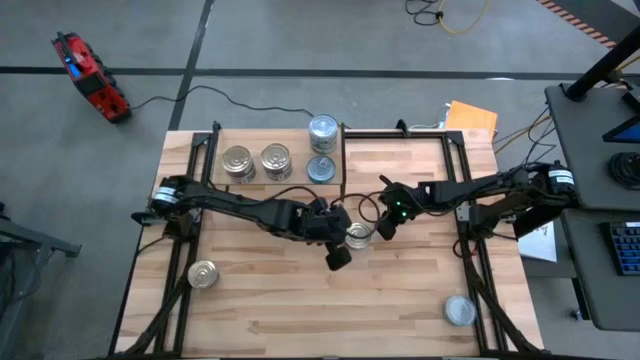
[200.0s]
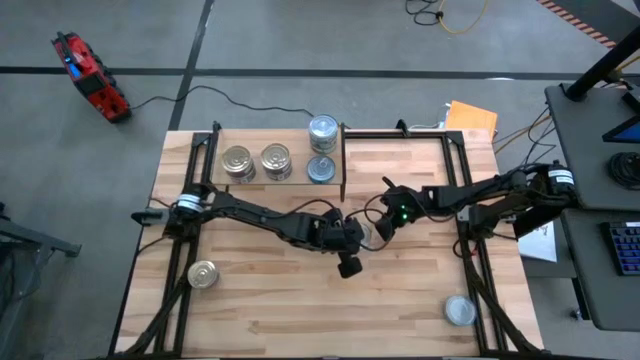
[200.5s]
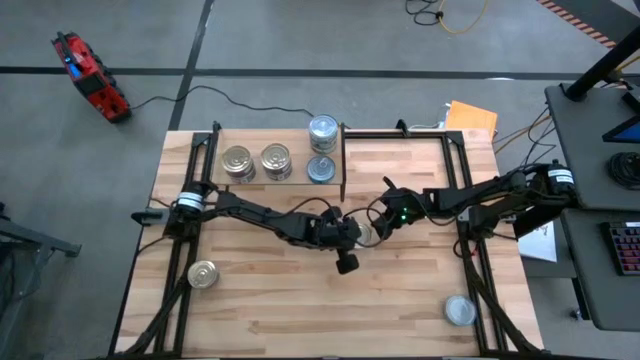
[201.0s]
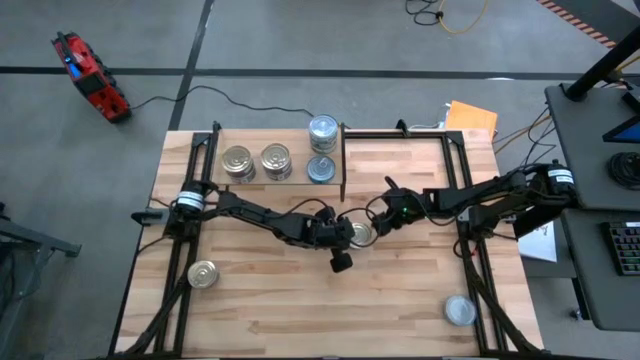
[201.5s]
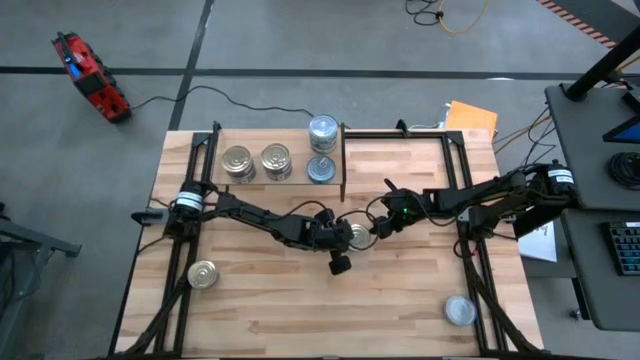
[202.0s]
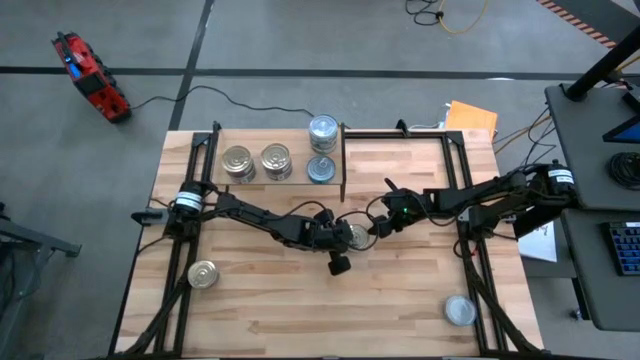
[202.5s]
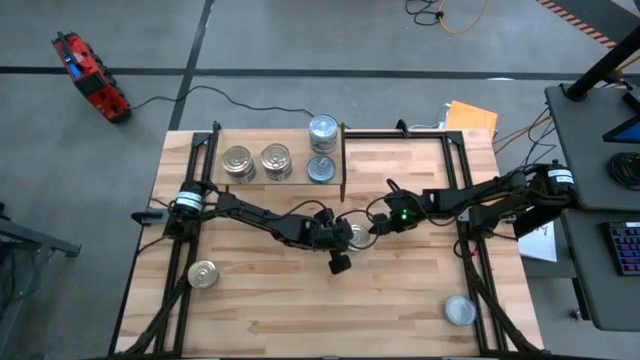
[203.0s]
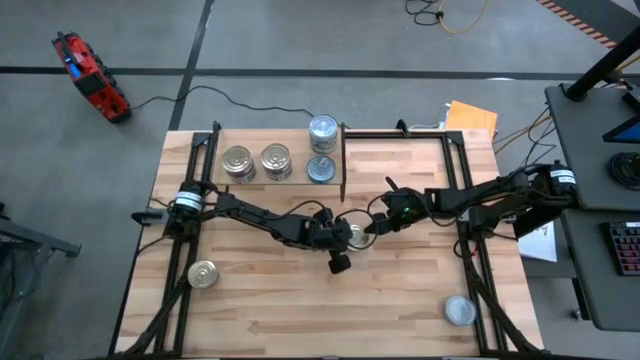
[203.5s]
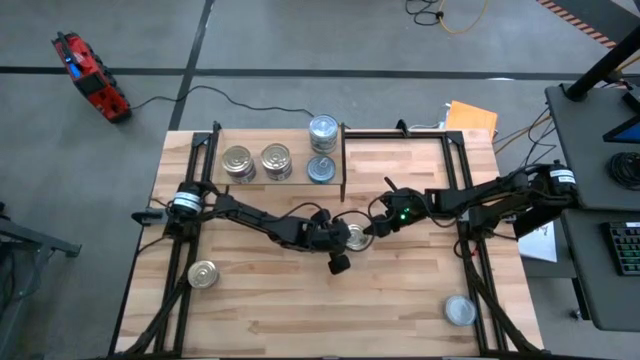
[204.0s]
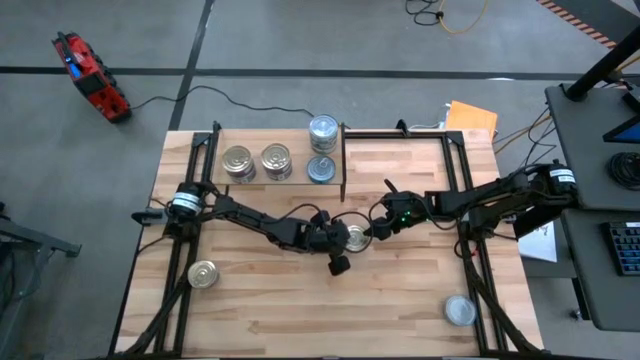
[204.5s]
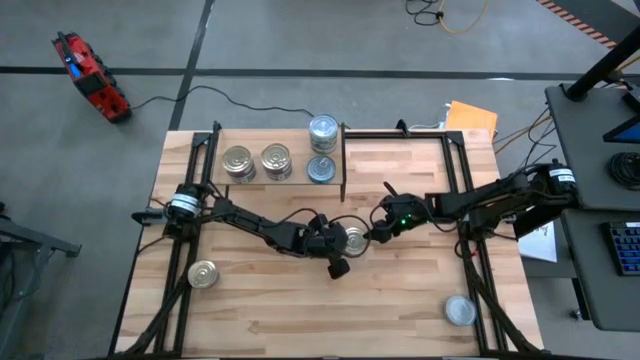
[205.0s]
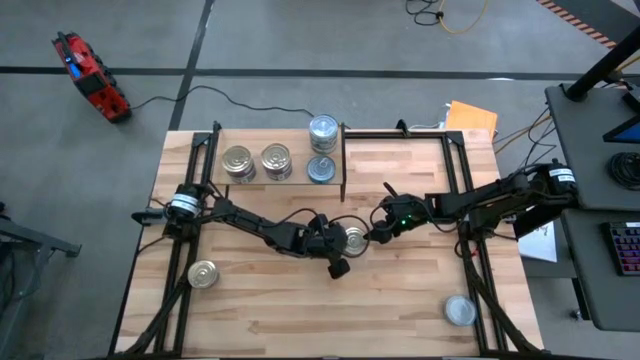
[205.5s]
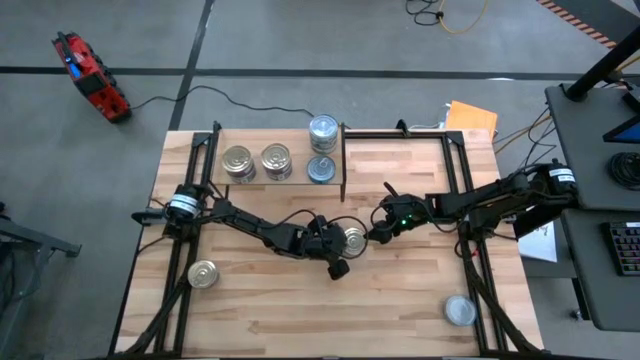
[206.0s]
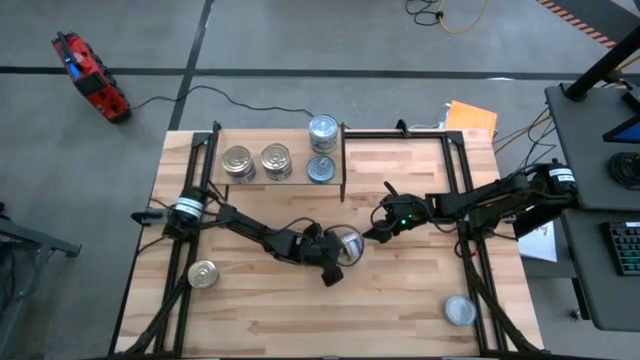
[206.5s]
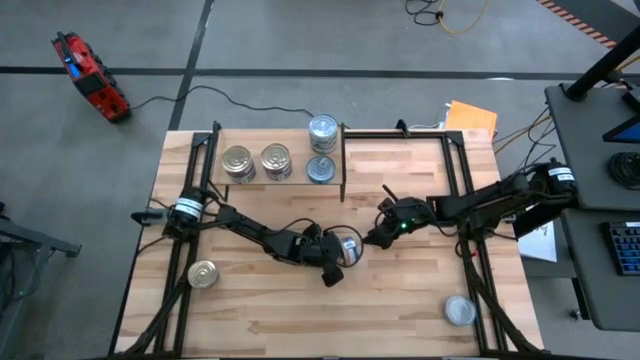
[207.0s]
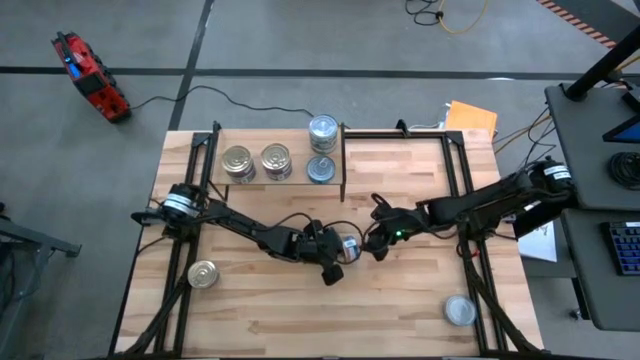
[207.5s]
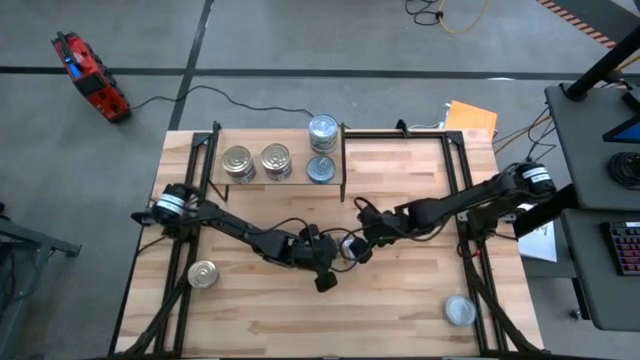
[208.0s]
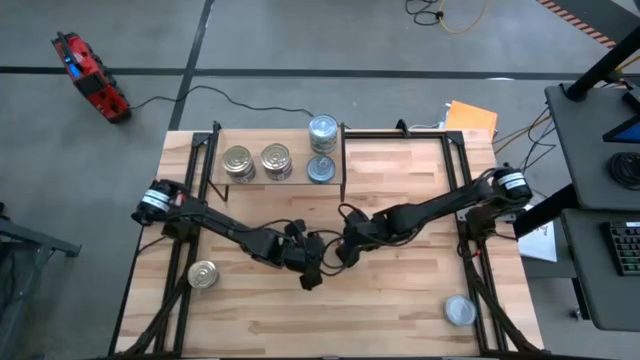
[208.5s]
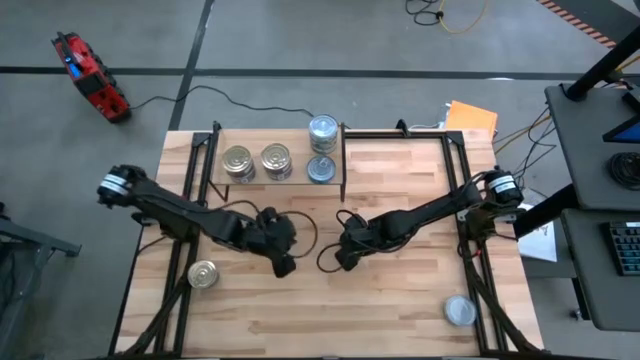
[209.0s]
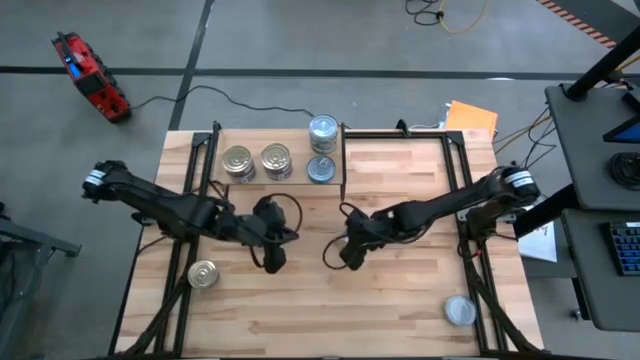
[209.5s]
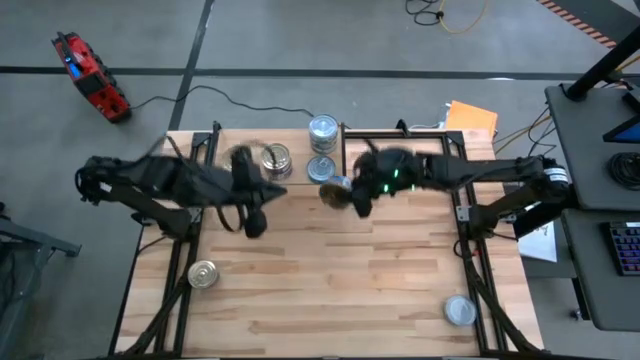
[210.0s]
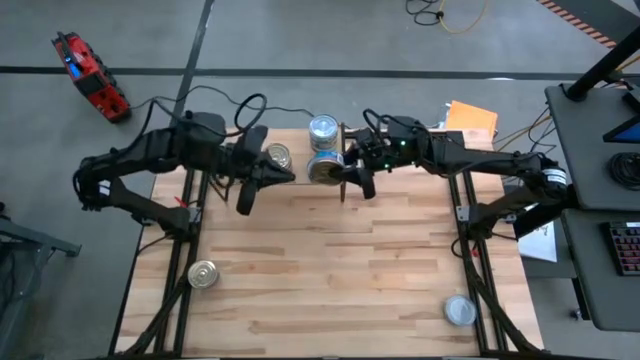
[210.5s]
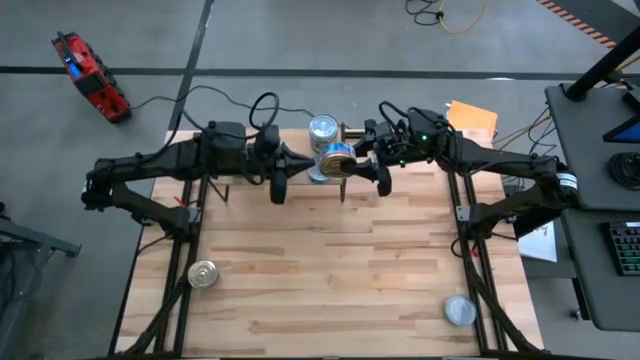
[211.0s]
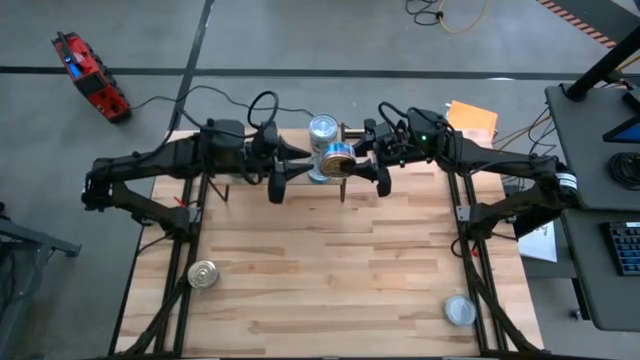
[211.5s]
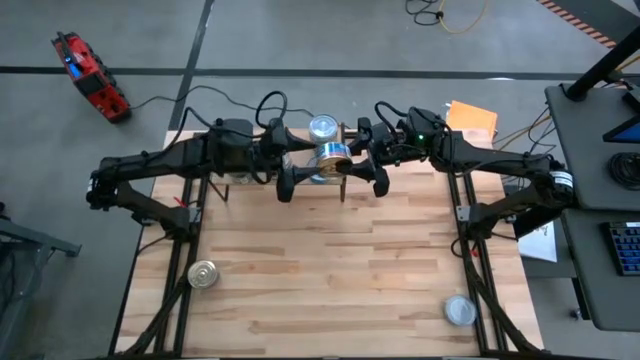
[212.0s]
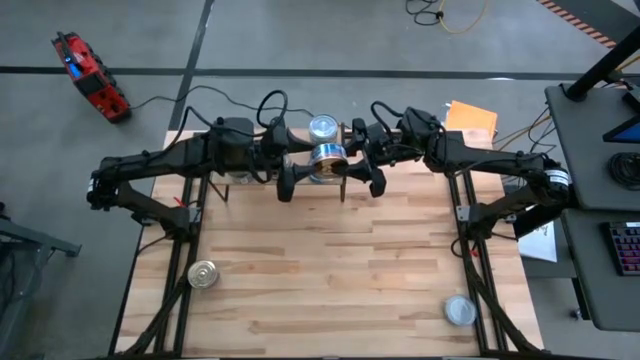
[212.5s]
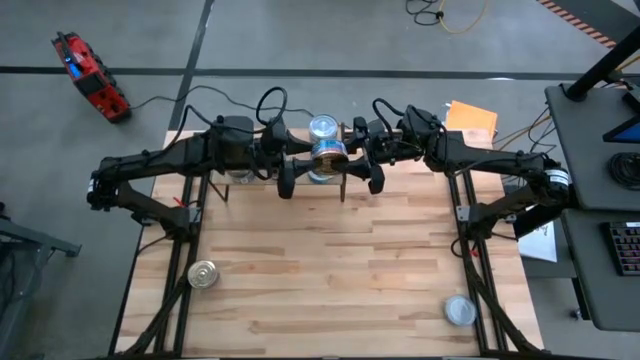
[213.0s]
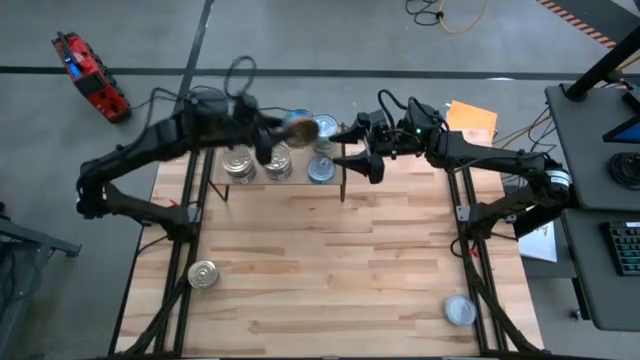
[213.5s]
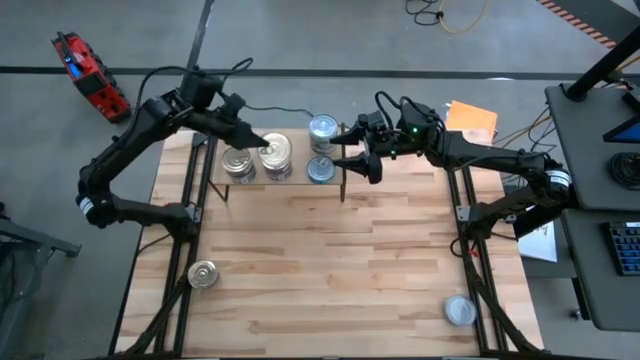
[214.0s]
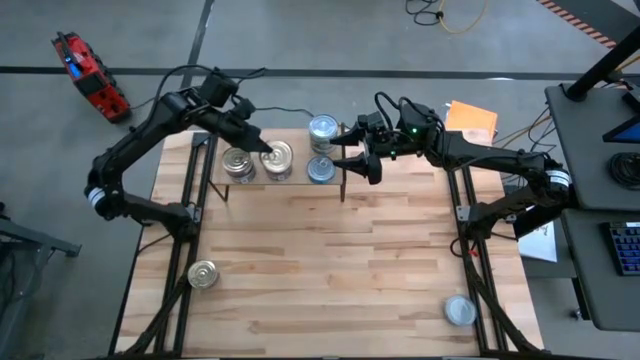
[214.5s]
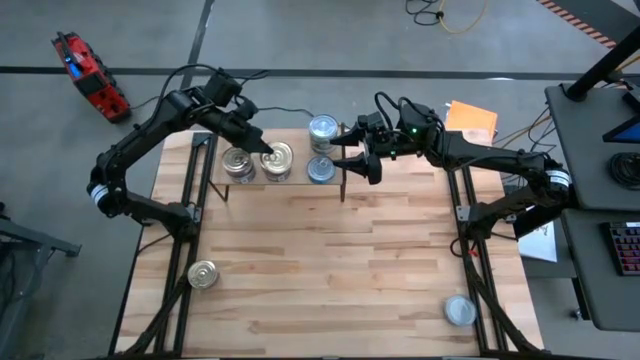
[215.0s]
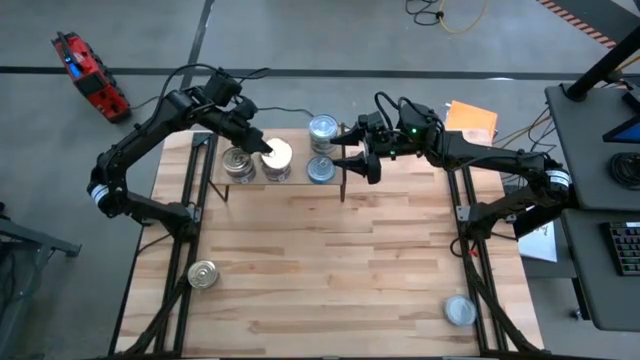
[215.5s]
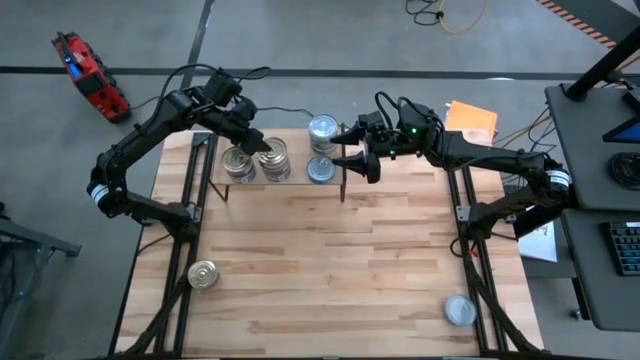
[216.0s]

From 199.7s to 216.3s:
Task: Stack canned seafood by type on shelf
Stack the blue and pink tuna can on top of the blue and pink tuna can on the shelf

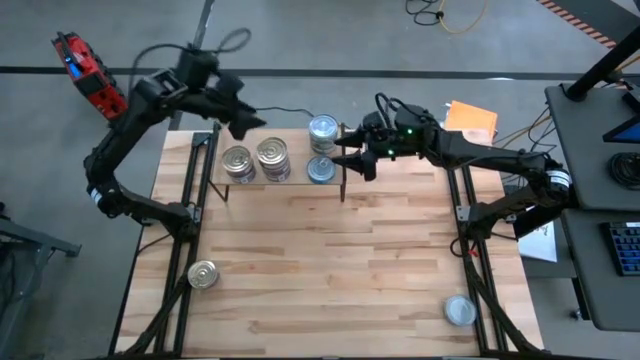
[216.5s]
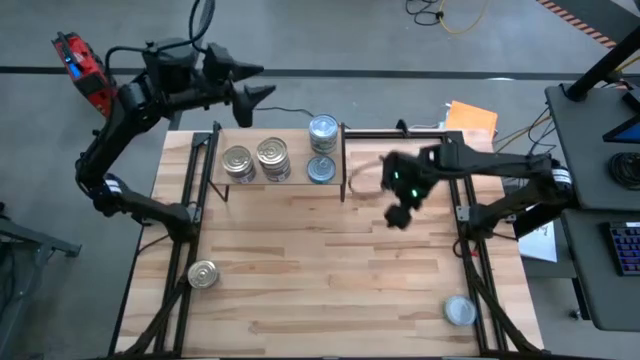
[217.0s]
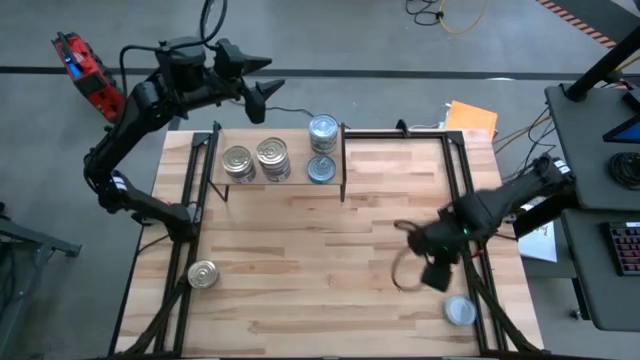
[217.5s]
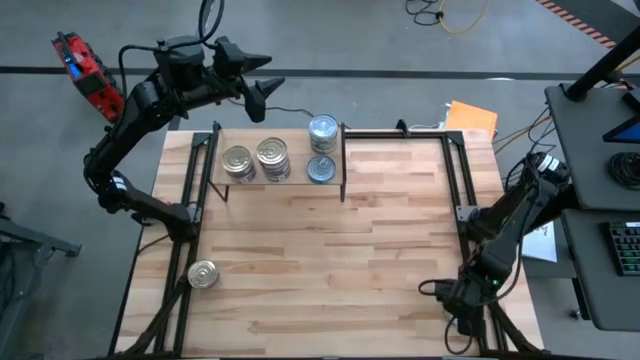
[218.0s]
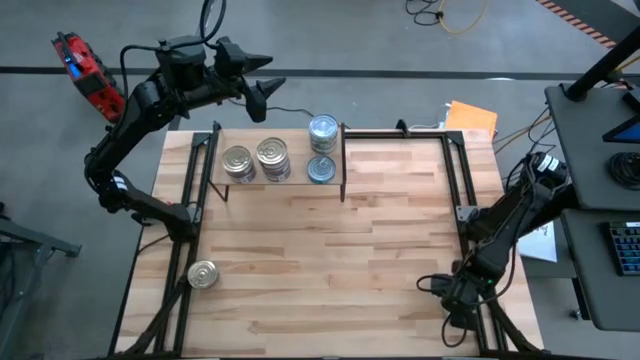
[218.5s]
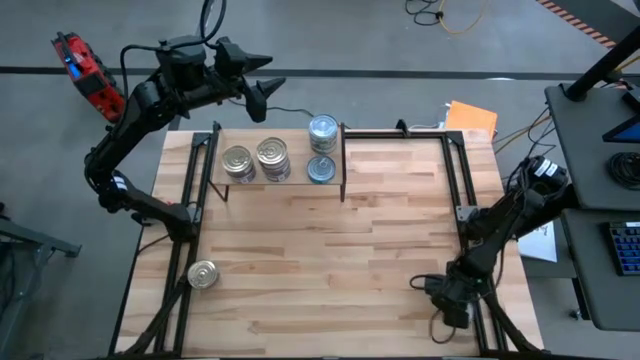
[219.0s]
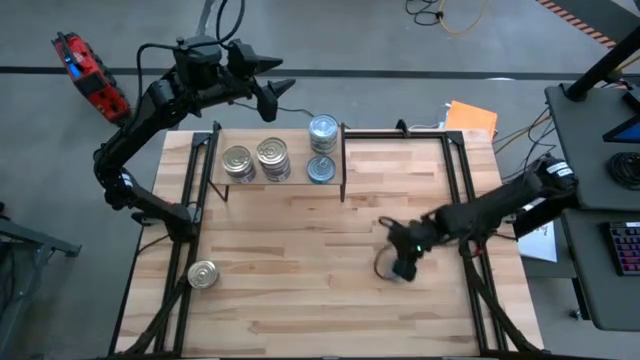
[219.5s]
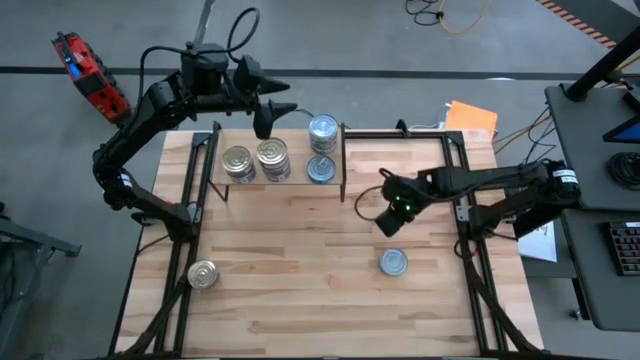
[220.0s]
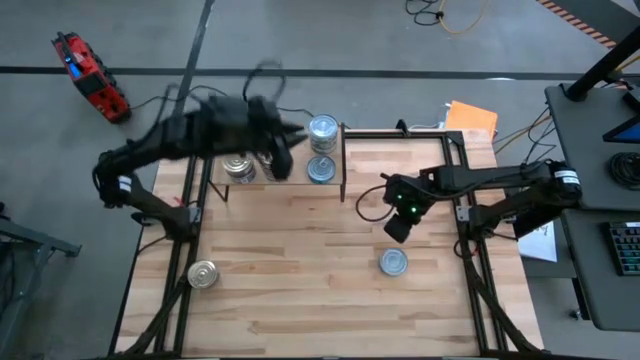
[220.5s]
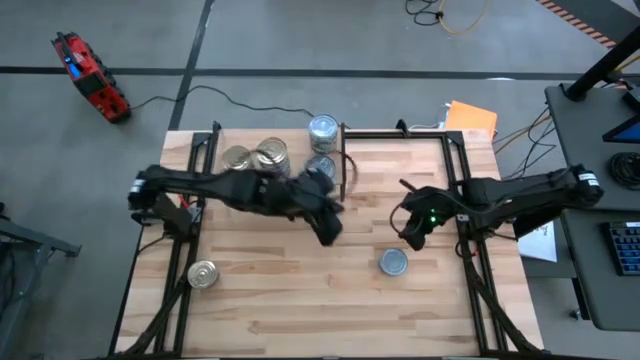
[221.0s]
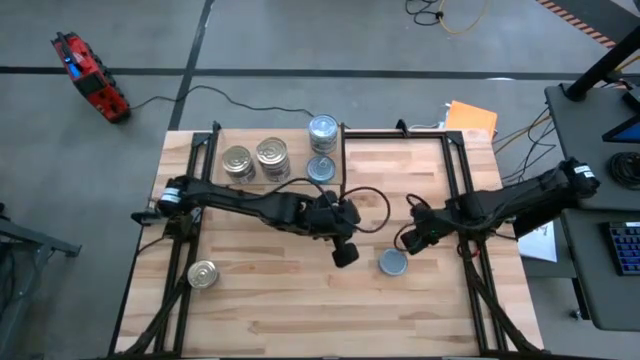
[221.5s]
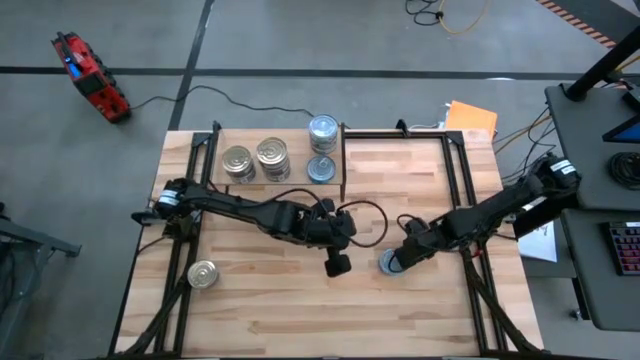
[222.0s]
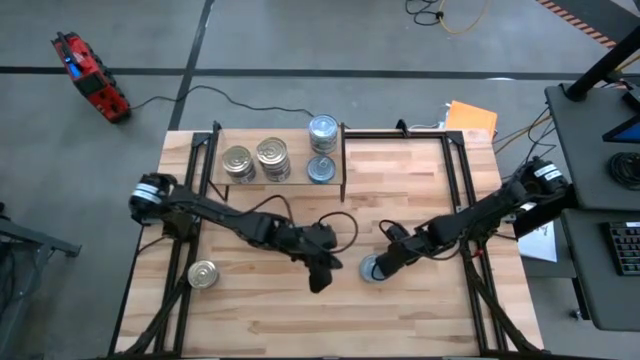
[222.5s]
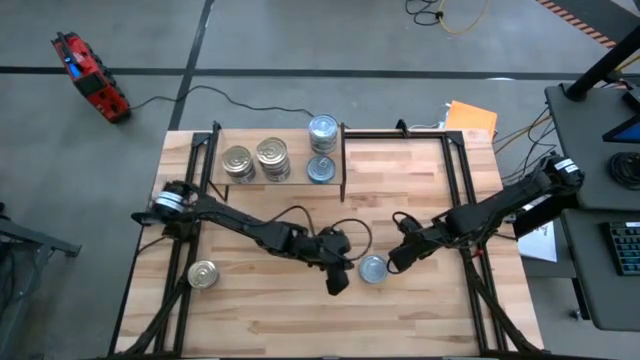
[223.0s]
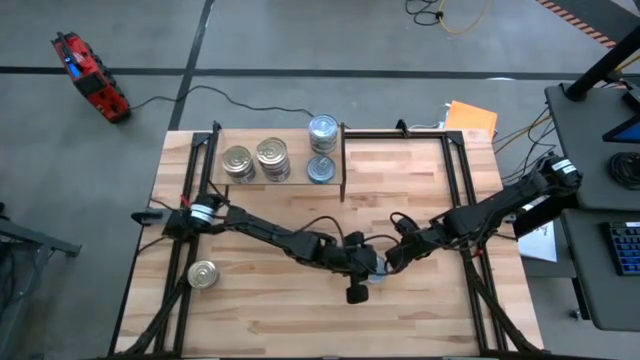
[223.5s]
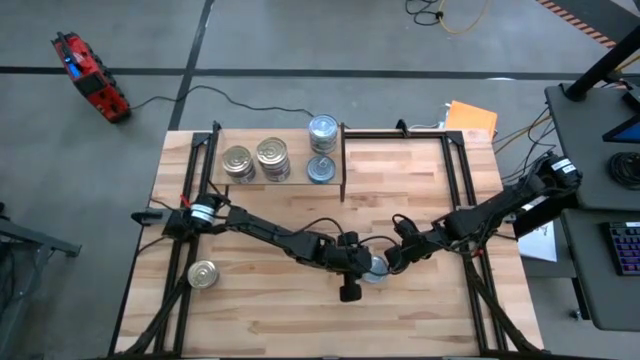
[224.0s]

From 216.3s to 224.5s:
Move the green tuna can to the middle right of the table
